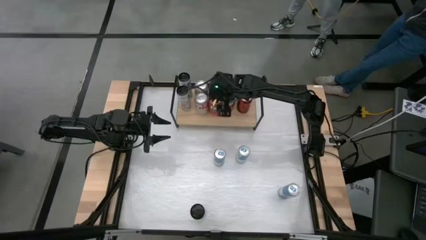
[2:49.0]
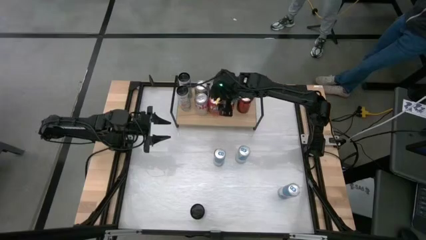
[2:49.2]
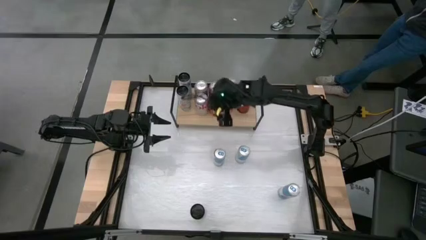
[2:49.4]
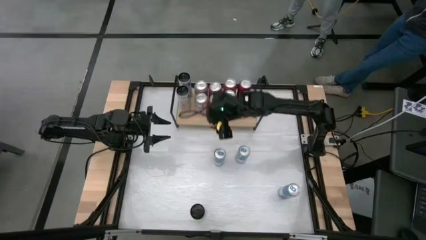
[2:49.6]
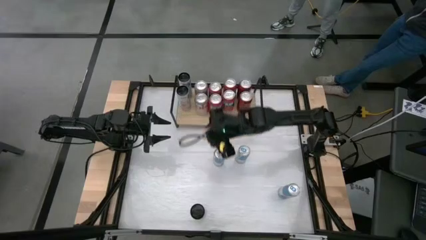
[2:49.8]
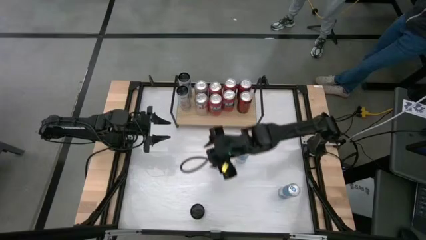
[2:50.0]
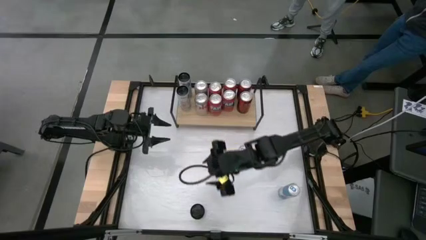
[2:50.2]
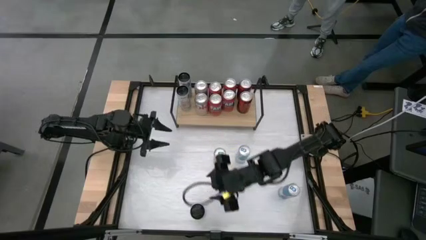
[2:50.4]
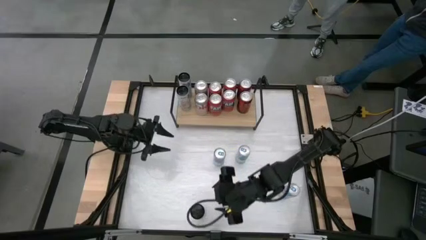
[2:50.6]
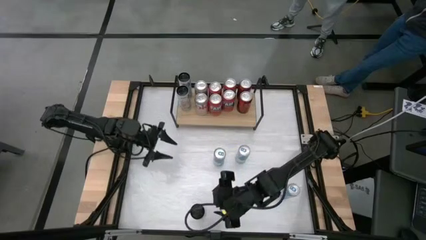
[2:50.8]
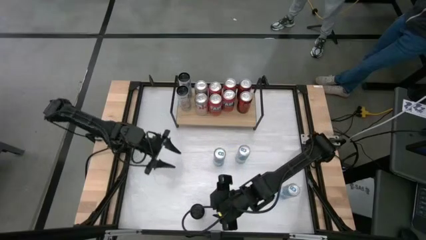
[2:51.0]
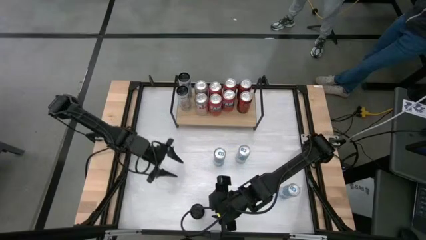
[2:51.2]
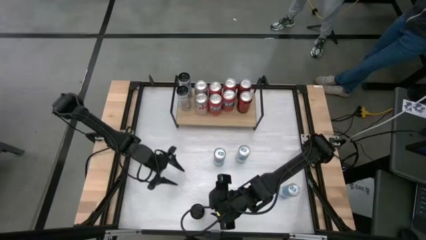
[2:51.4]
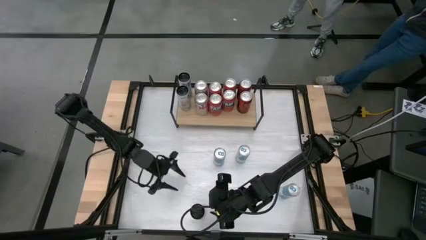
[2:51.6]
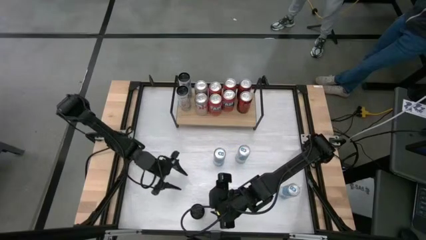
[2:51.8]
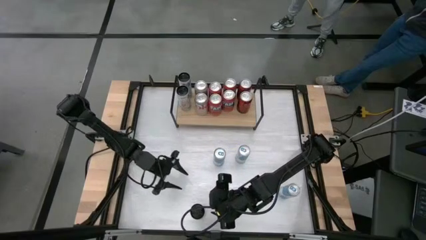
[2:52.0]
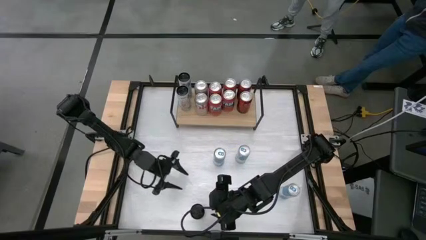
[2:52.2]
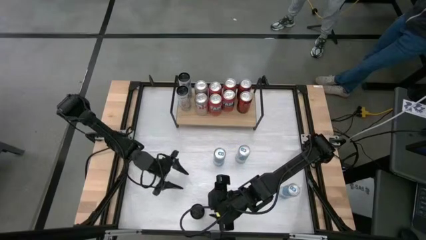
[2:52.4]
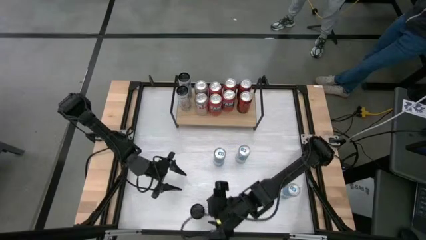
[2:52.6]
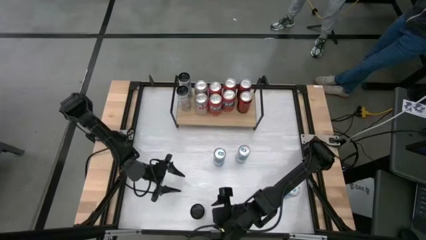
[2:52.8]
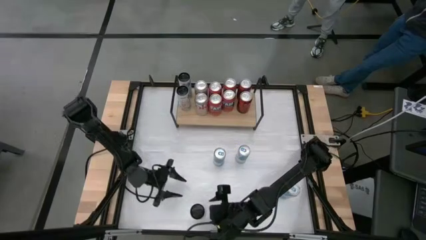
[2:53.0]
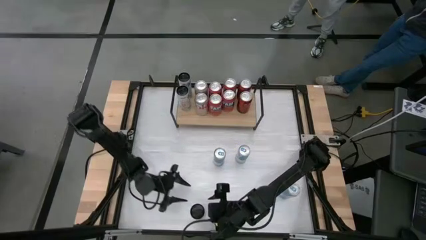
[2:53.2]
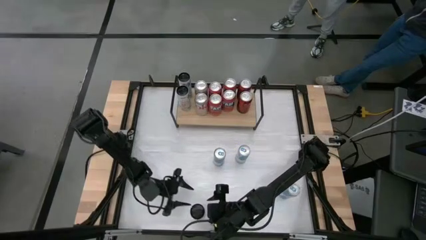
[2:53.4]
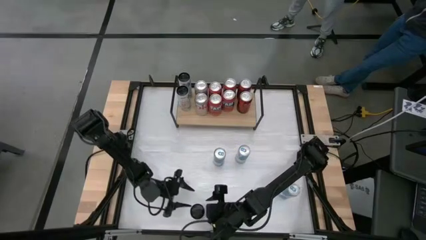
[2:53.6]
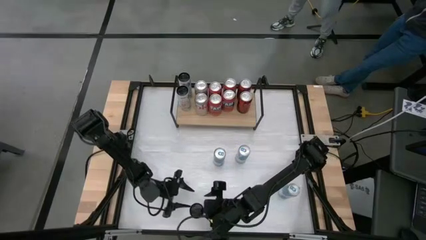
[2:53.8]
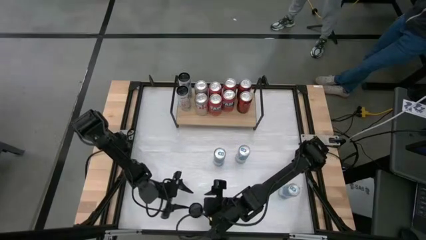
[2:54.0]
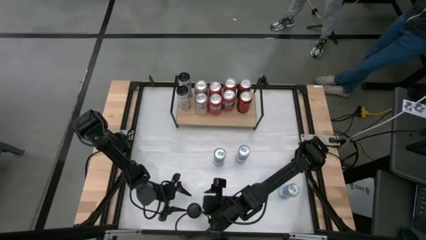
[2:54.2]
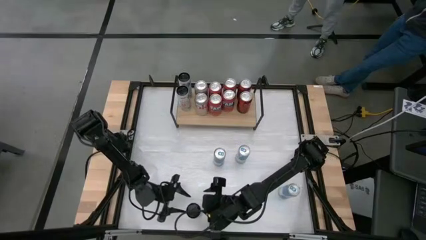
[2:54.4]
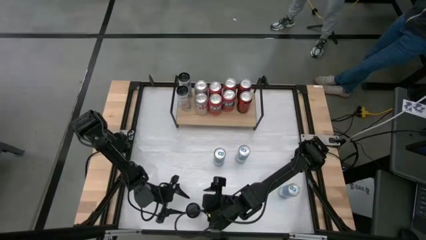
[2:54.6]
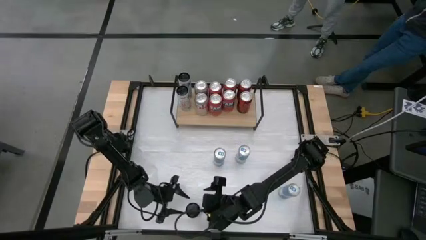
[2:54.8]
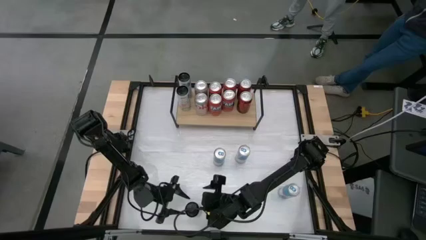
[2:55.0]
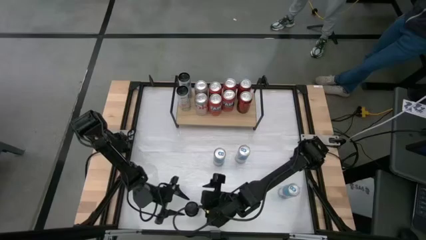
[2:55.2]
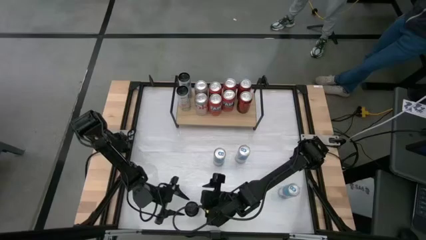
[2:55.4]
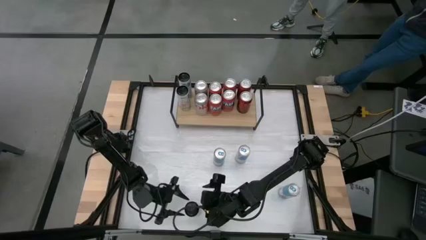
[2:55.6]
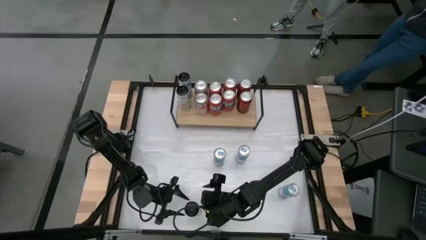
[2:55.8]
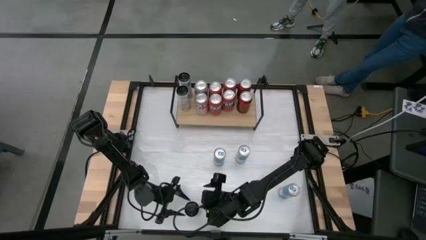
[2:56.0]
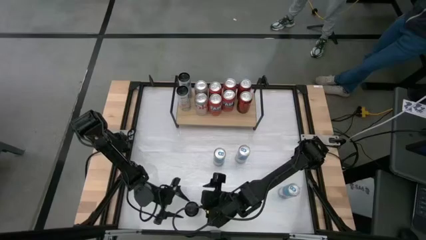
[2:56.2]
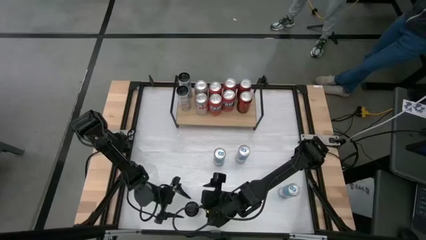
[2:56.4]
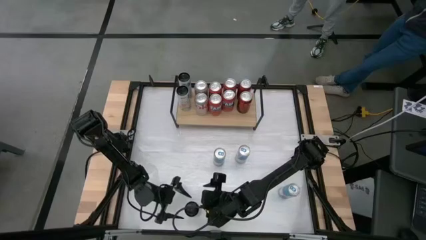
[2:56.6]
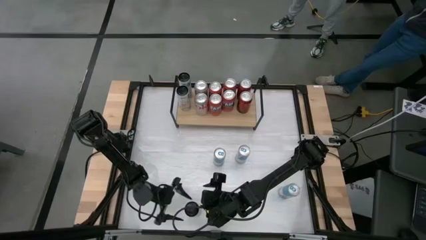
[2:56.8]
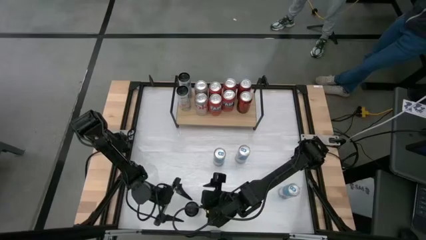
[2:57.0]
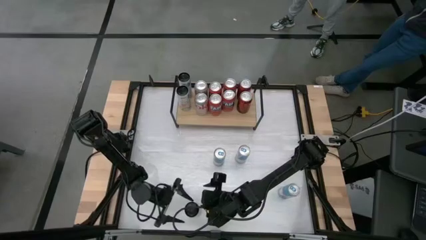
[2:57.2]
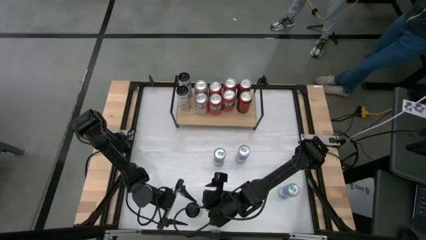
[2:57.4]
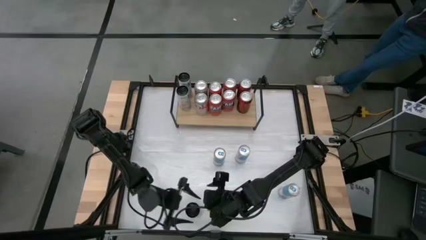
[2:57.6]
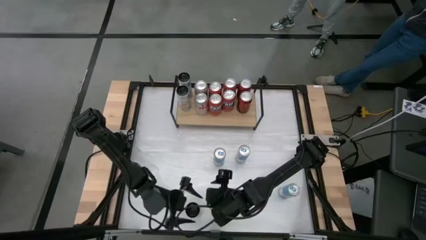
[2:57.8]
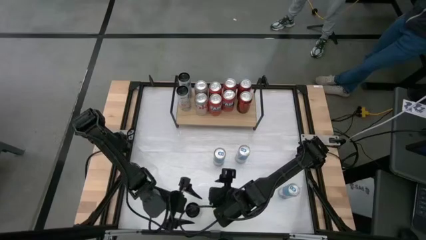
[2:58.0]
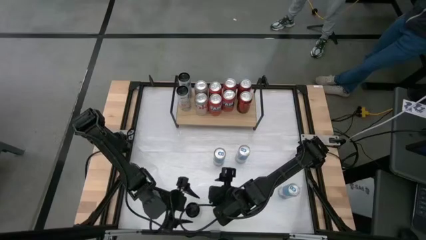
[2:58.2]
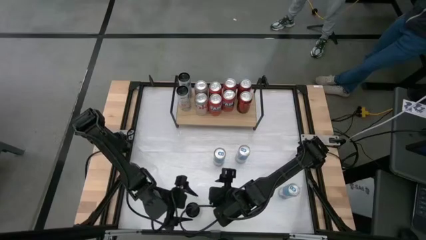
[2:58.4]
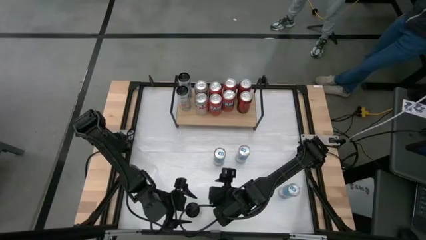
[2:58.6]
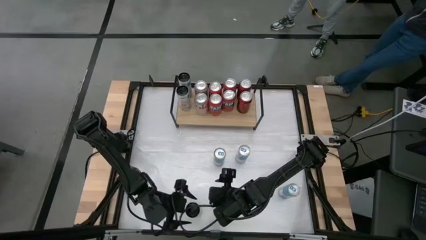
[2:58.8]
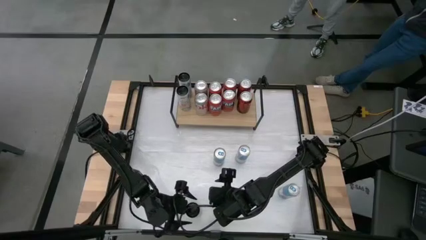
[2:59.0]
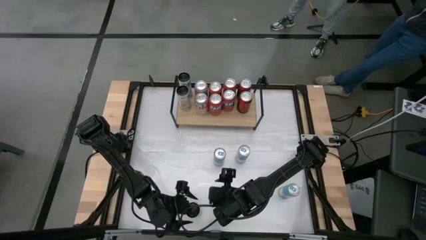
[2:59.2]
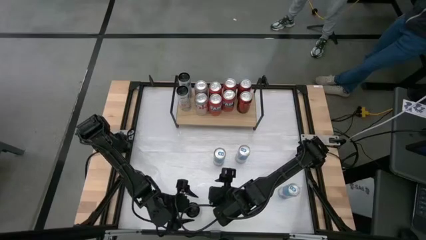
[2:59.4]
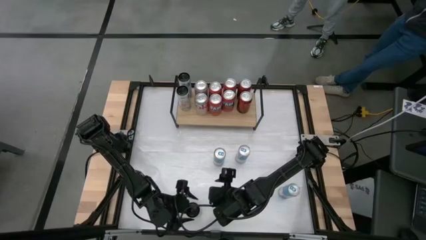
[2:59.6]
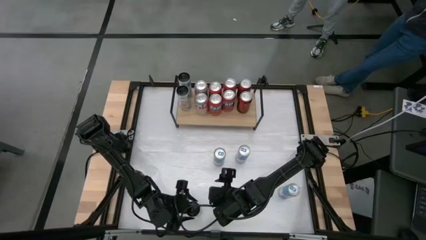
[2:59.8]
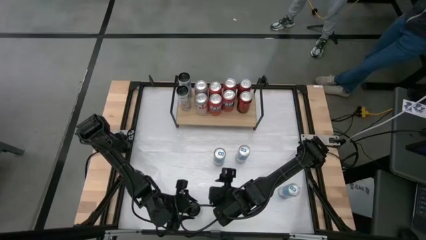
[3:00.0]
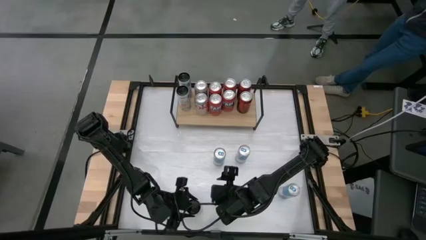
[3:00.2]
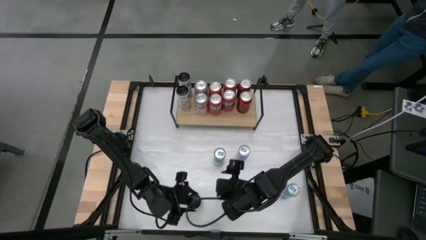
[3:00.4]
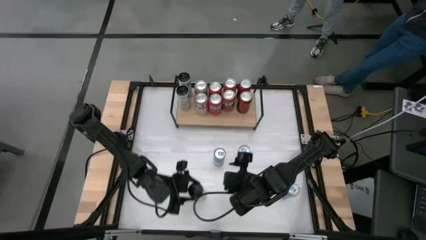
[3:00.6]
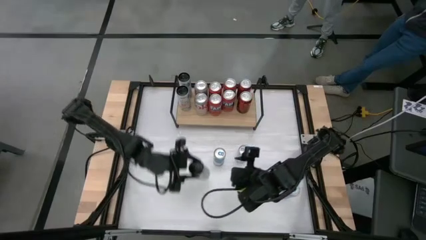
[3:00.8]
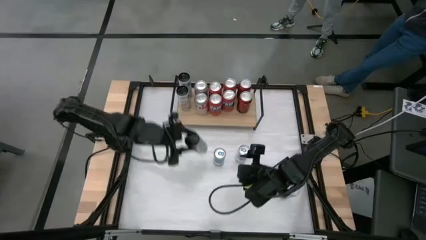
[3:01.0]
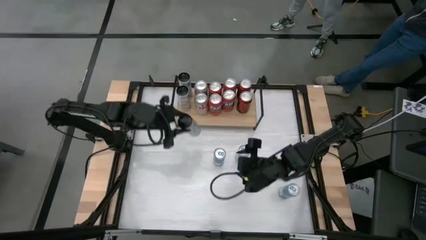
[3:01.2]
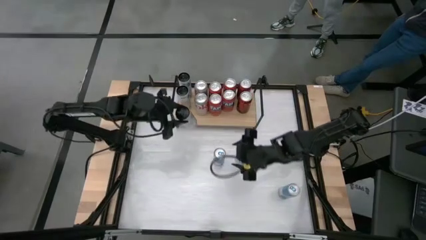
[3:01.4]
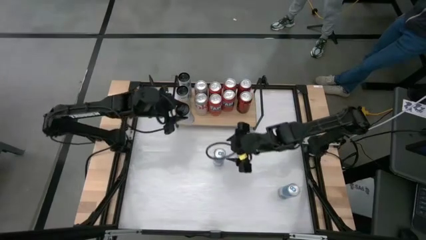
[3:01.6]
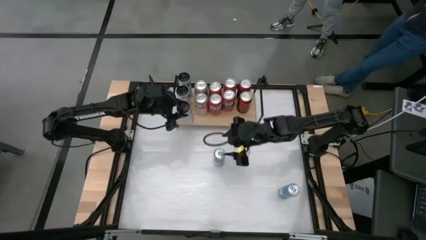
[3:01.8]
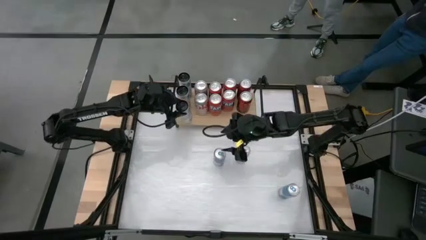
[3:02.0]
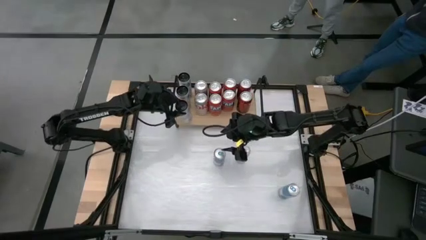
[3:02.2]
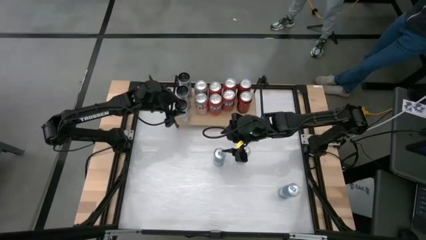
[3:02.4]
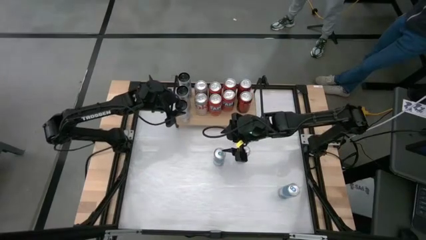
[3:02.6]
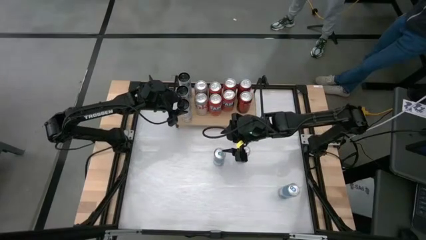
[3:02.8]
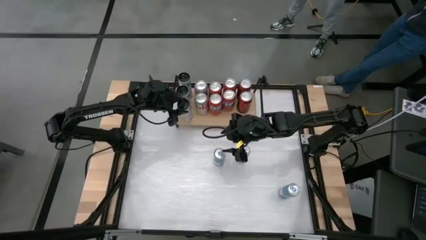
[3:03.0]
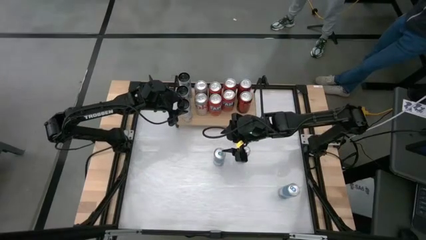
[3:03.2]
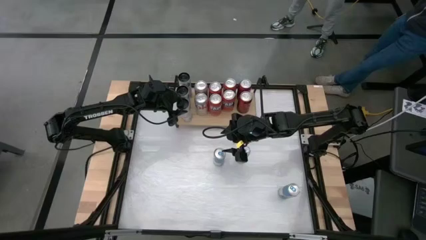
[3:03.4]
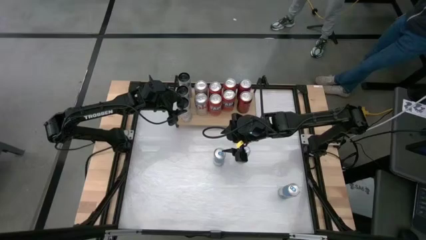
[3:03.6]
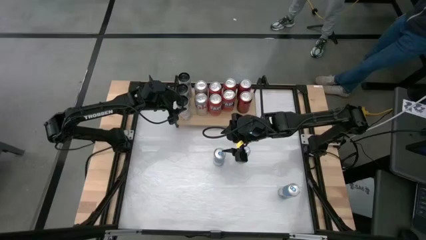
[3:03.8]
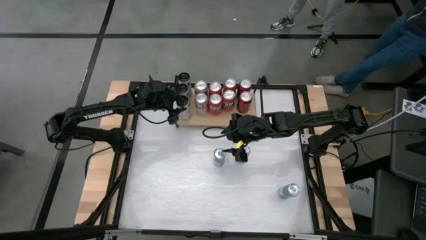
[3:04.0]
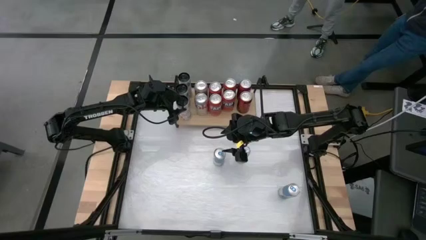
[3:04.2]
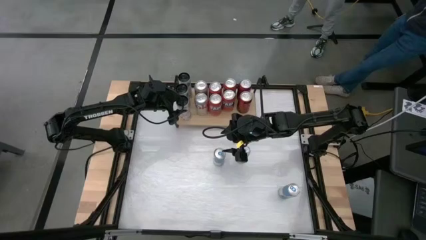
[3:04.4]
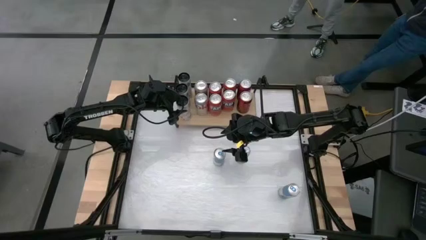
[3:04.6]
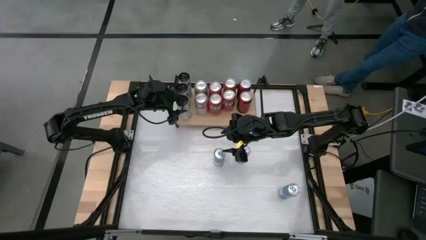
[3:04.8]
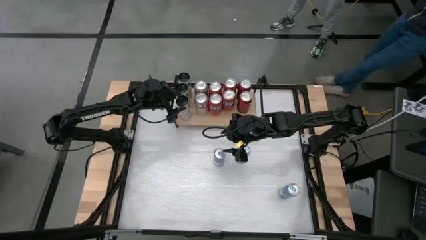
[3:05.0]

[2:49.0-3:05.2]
Task: Place canned beverage on shelf
Put the white and pink soda can on the shelf aligned with other white and pink soda can
